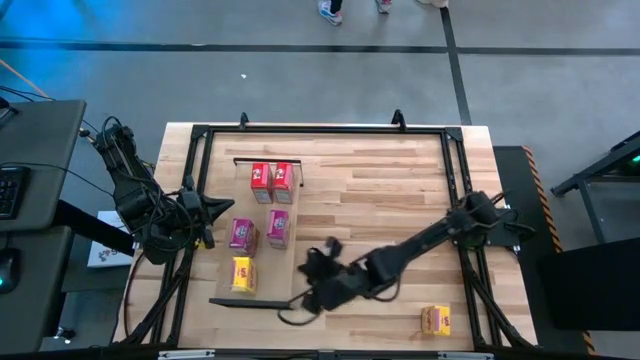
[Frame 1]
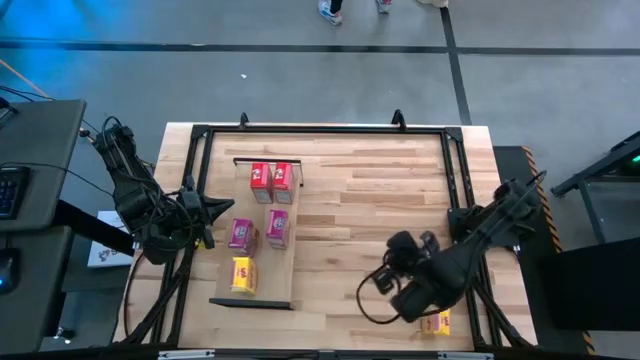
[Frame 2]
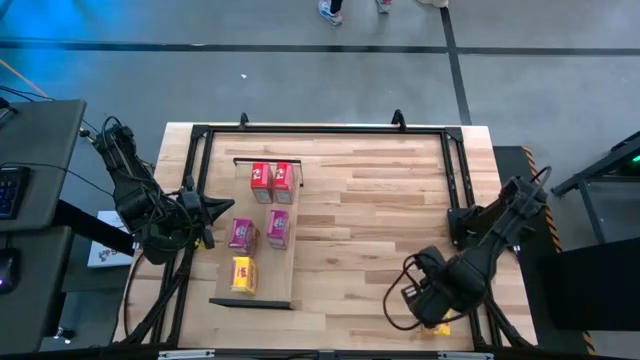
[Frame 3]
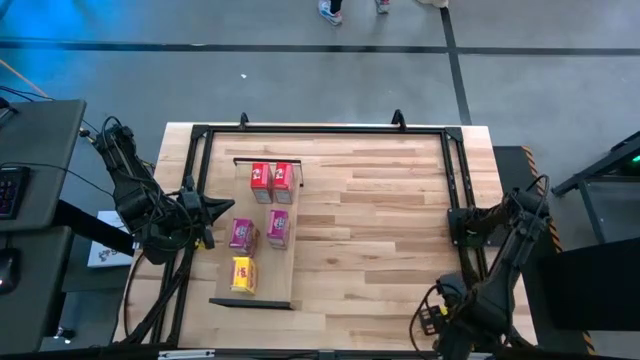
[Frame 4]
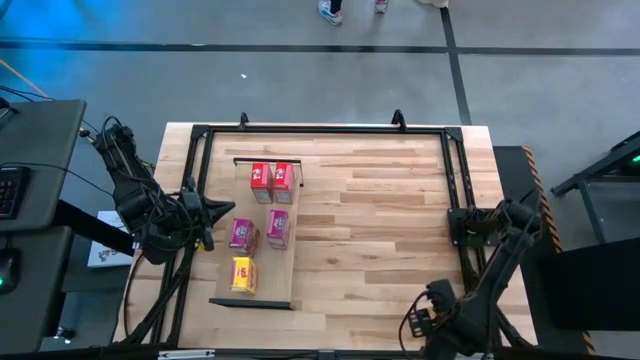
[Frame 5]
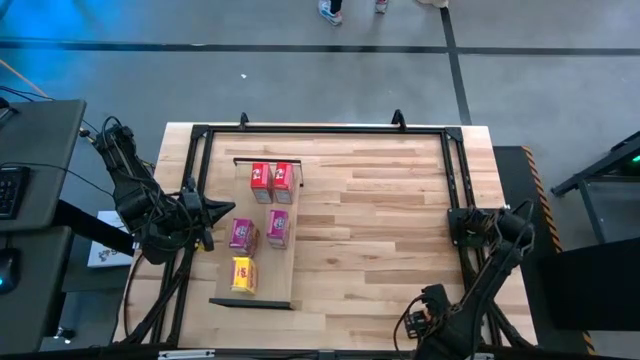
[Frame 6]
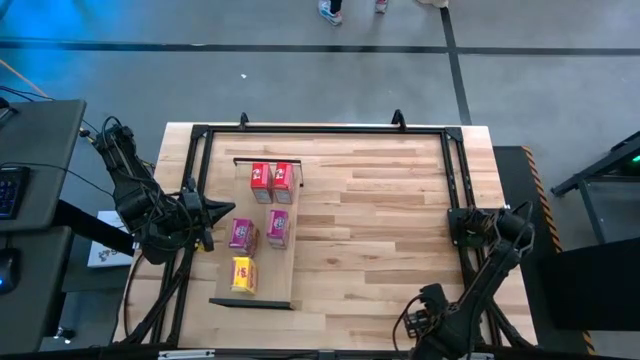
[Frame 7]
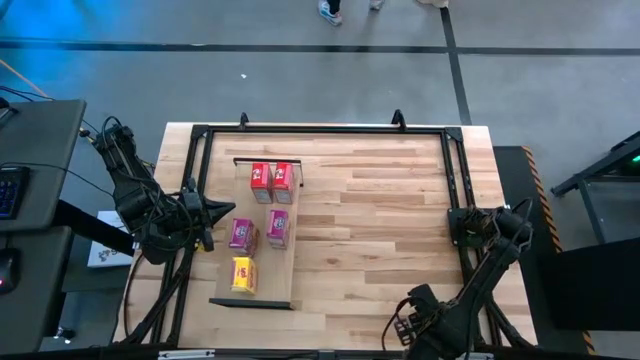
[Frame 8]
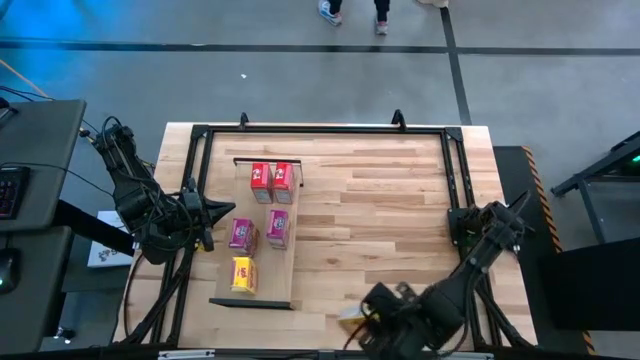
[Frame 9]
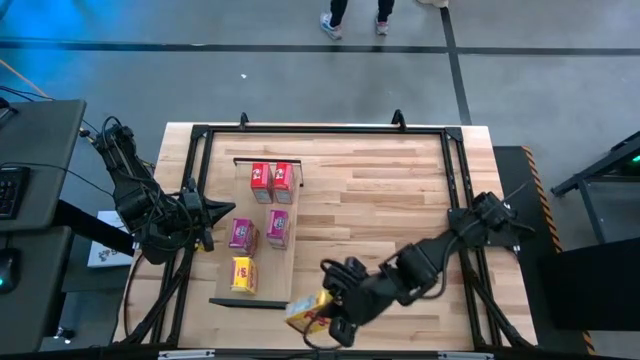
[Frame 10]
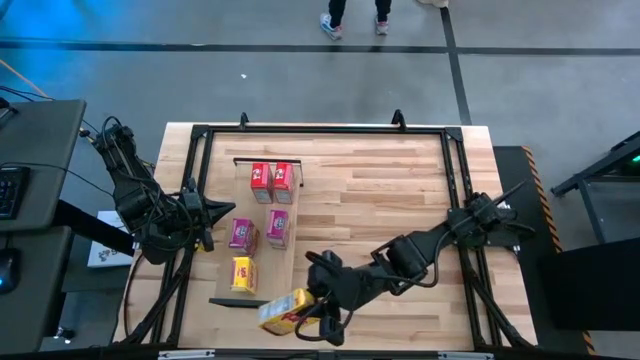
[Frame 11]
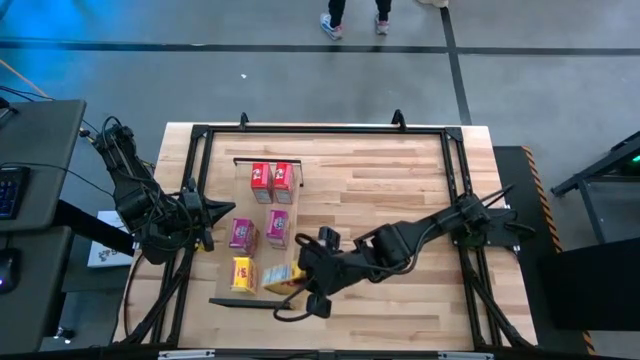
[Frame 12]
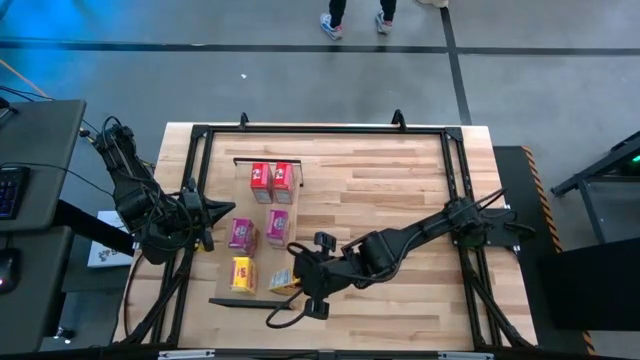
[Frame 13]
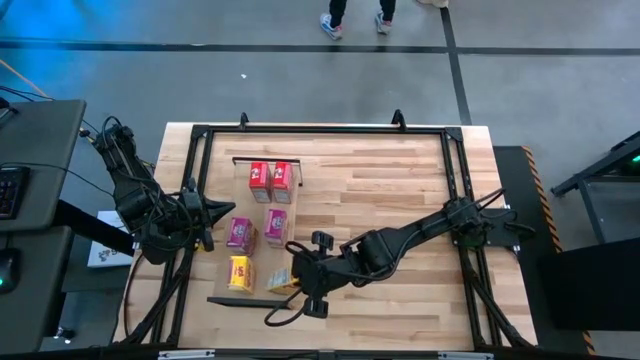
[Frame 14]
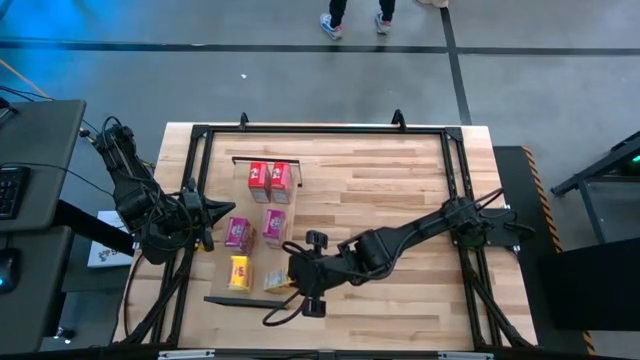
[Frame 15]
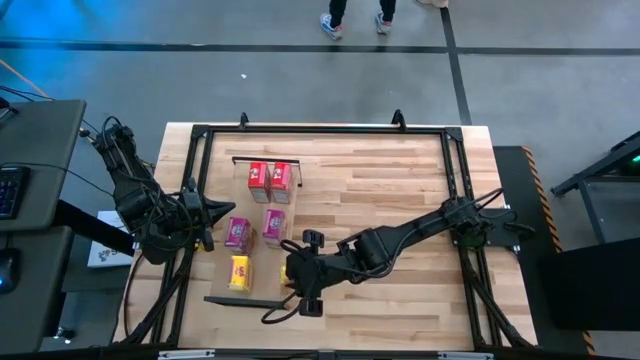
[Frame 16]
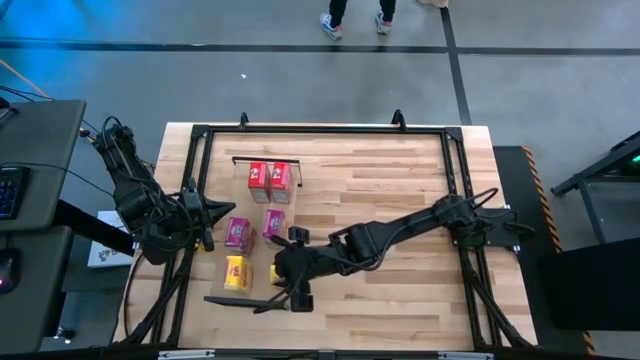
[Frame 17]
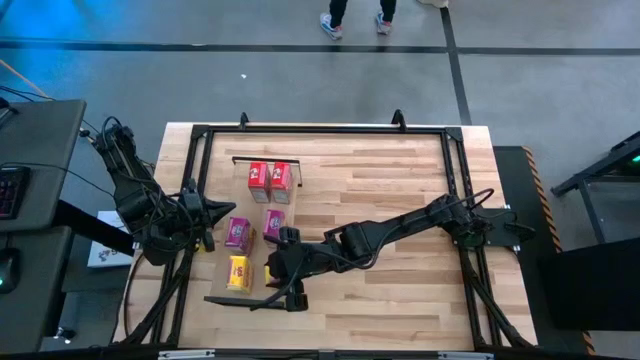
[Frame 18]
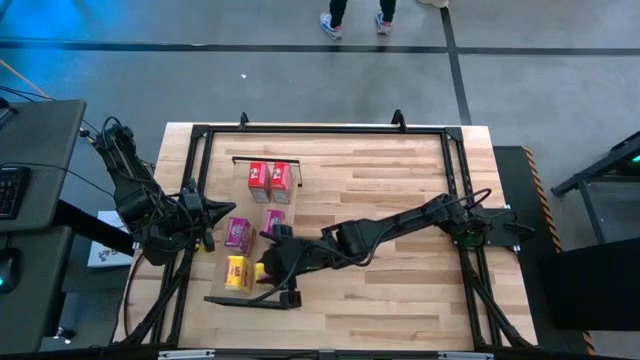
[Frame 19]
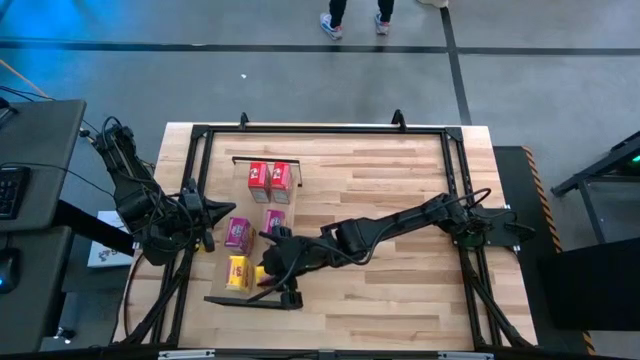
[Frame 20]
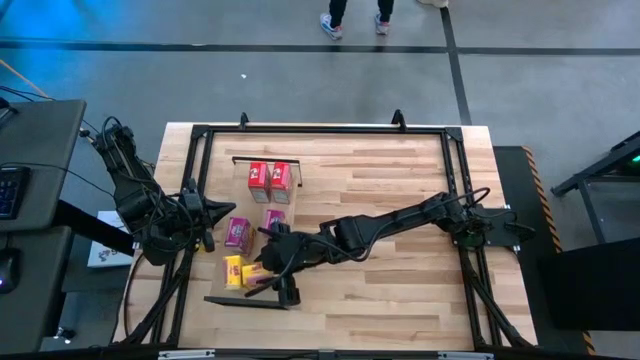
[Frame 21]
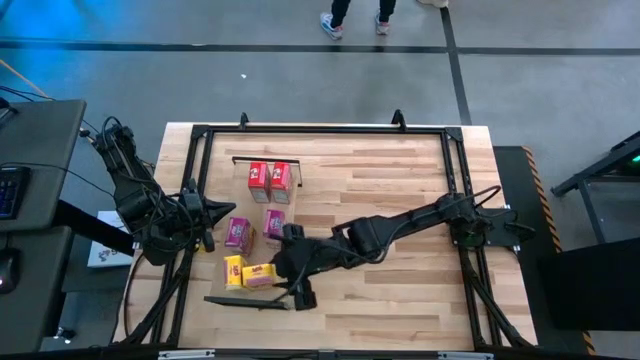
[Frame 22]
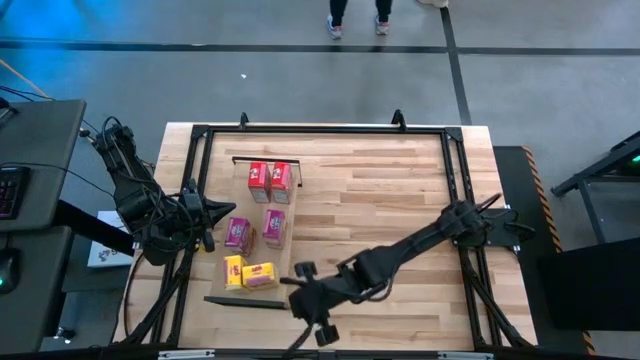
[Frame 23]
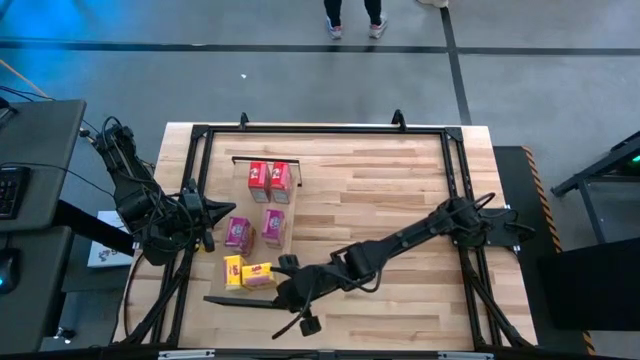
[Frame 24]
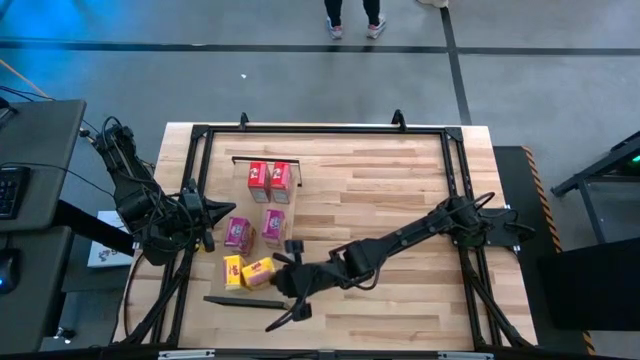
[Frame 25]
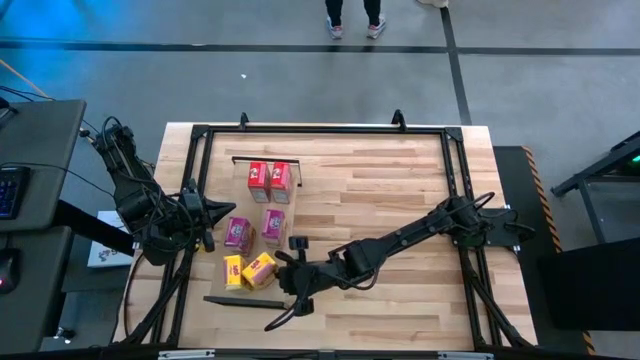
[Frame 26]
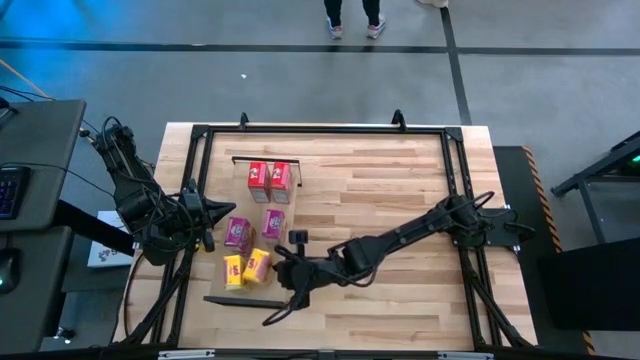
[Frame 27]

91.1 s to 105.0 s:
Task: Stack cereal on shelf
Put the yellow cereal box on the shelf aligned with the yellow cereal box
